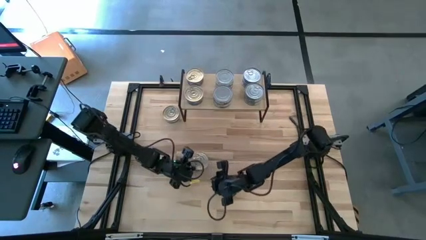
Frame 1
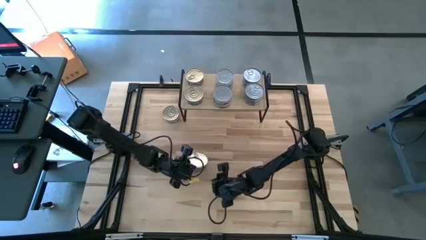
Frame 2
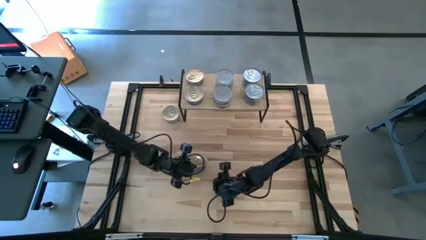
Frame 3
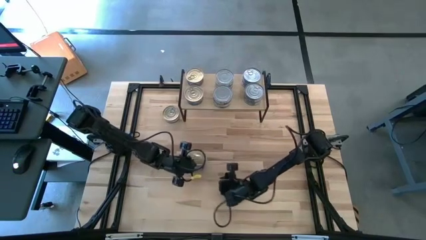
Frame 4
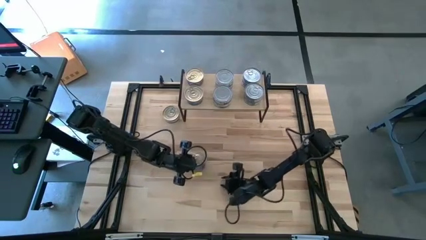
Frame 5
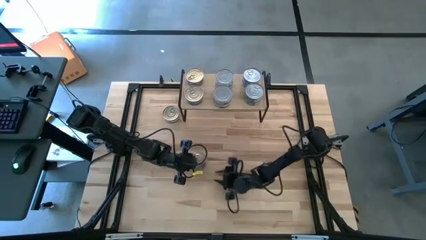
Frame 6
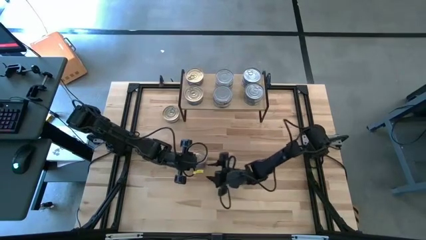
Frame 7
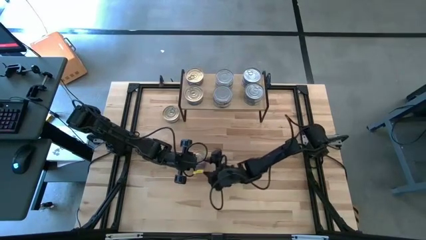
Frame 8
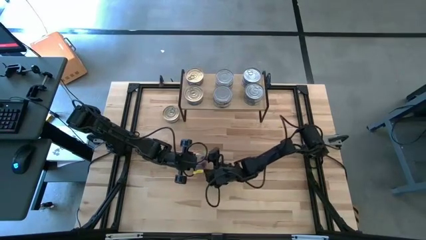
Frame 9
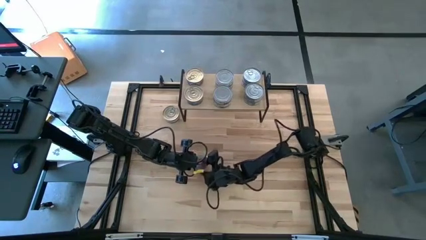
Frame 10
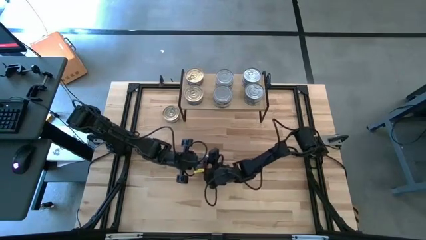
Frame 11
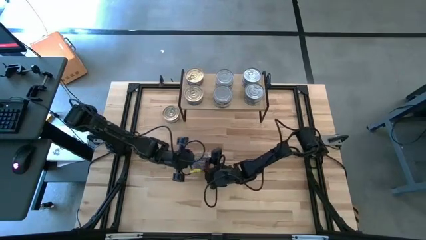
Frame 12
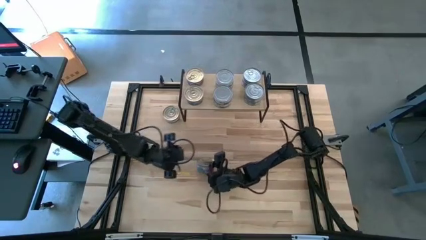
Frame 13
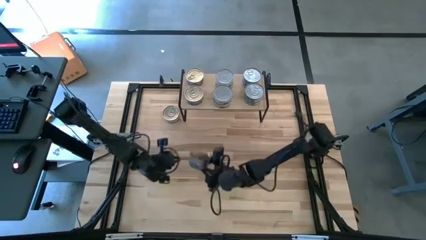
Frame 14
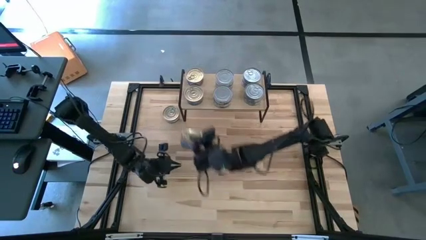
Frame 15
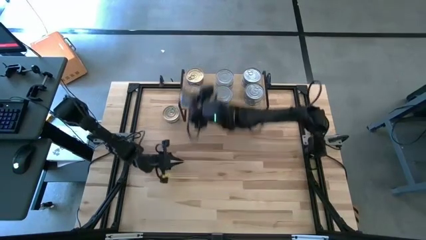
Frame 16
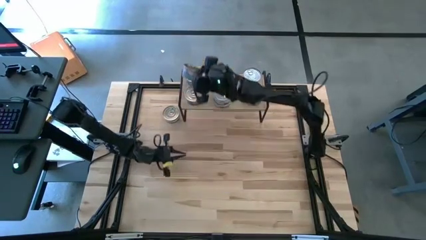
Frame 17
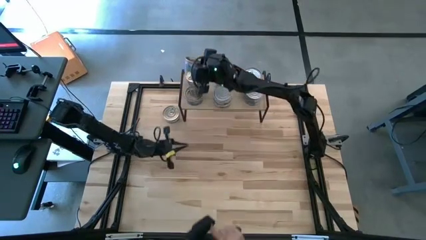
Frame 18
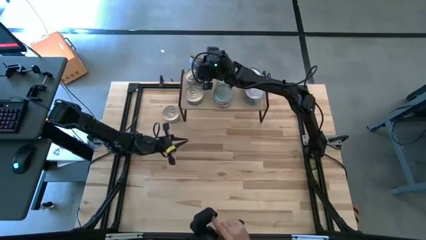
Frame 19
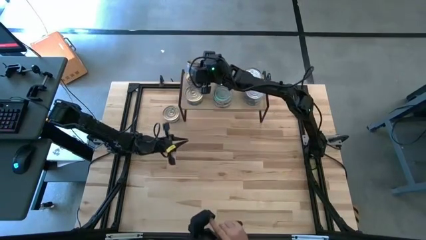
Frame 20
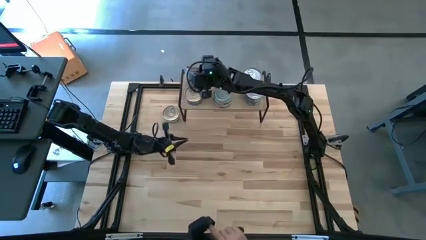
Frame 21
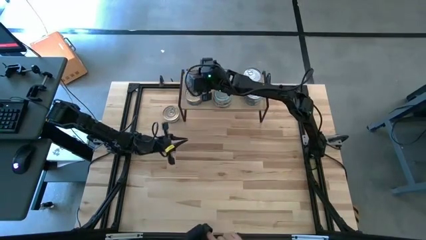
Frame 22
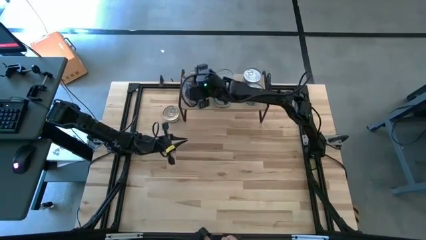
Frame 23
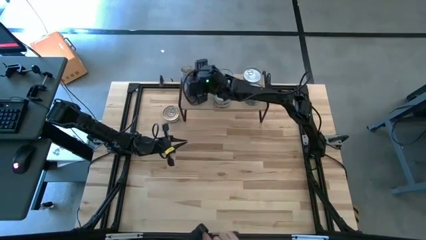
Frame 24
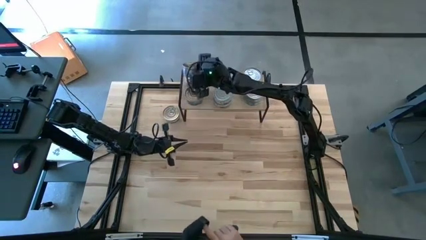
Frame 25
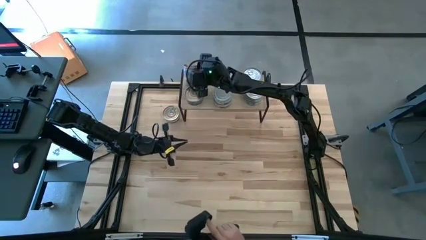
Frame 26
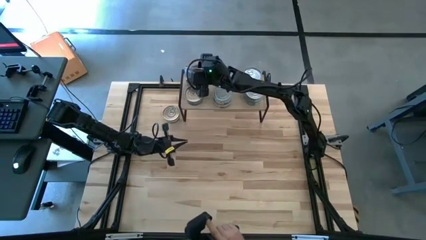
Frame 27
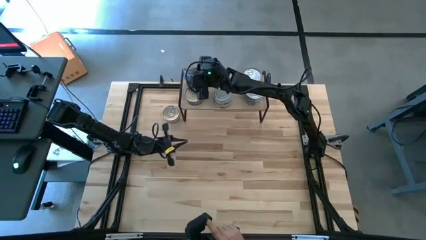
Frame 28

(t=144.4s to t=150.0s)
Task: Stack canned seafood by type on shelf
Stack the blue tuna can on top of the other blue tuna can

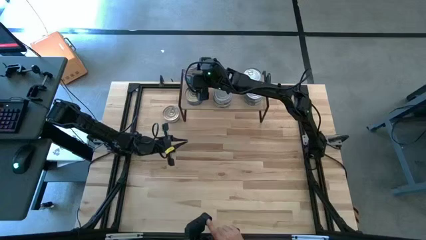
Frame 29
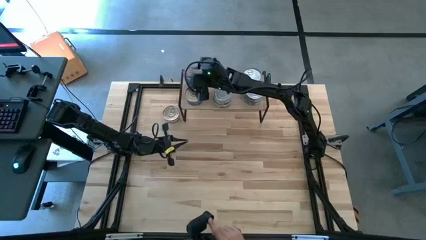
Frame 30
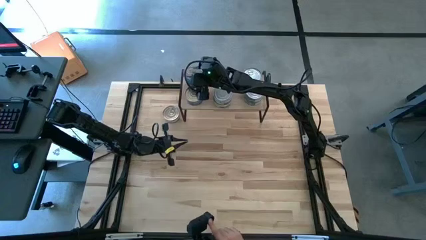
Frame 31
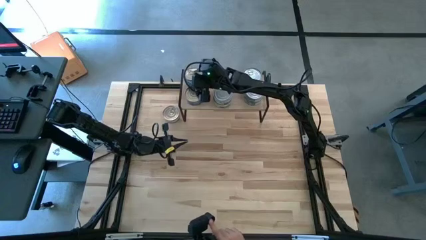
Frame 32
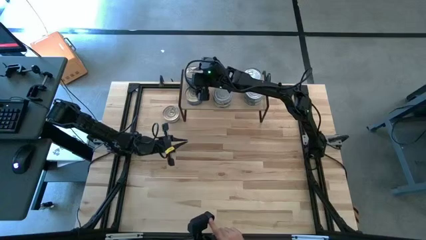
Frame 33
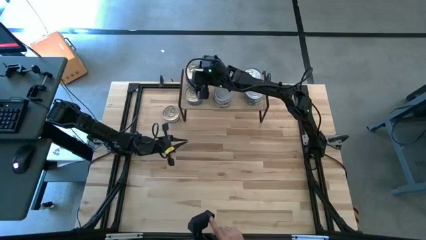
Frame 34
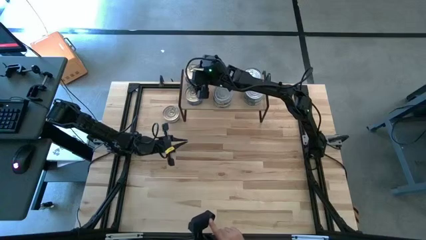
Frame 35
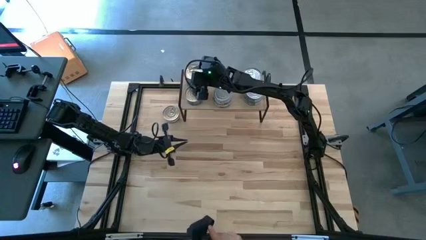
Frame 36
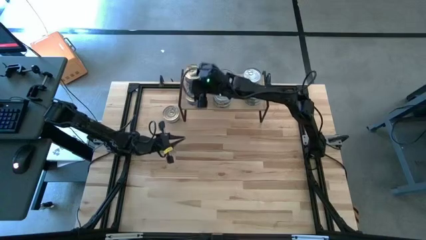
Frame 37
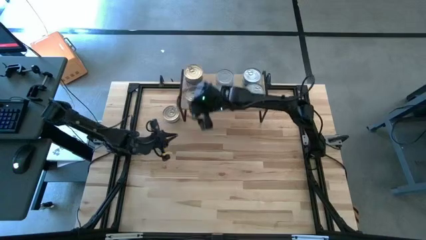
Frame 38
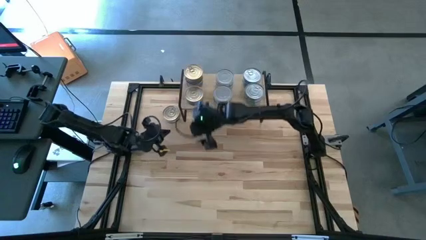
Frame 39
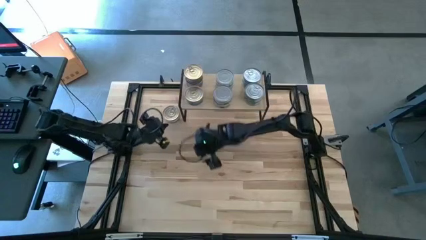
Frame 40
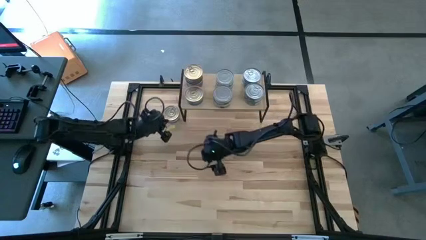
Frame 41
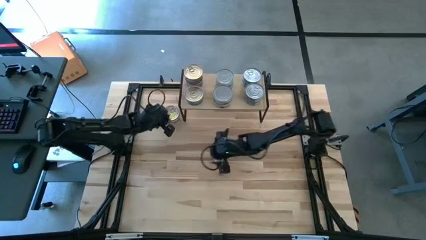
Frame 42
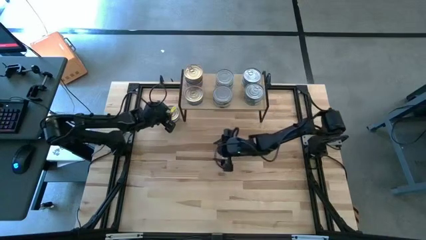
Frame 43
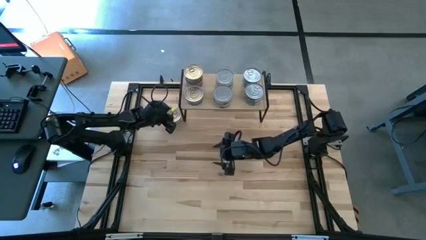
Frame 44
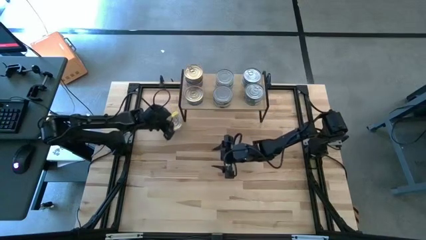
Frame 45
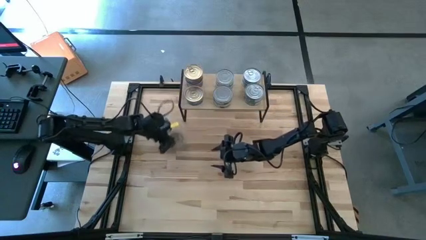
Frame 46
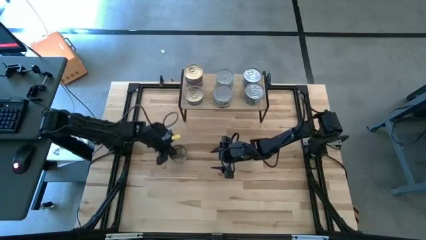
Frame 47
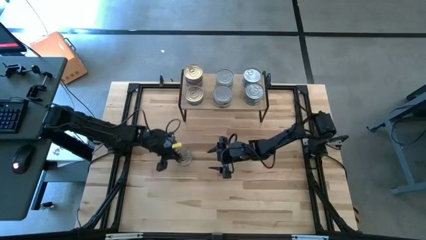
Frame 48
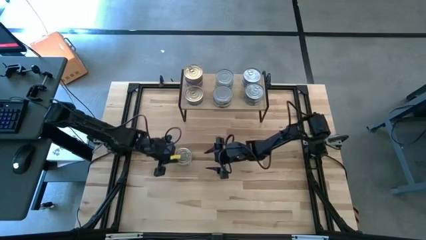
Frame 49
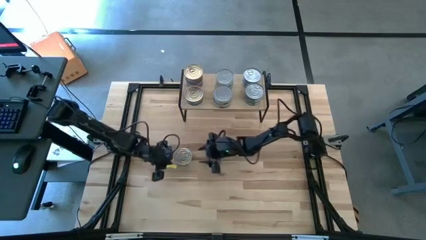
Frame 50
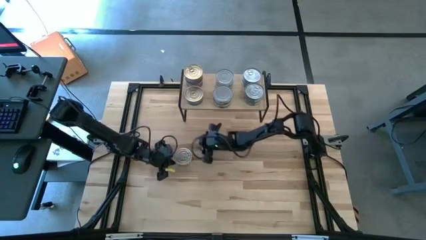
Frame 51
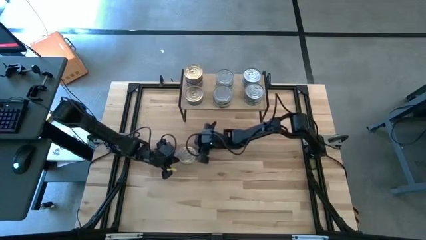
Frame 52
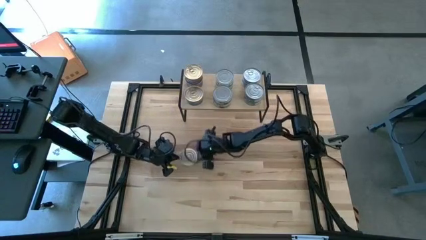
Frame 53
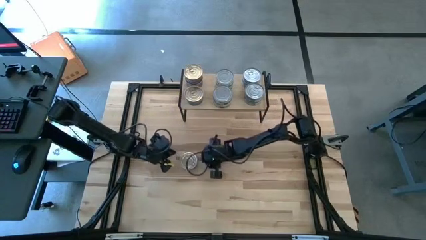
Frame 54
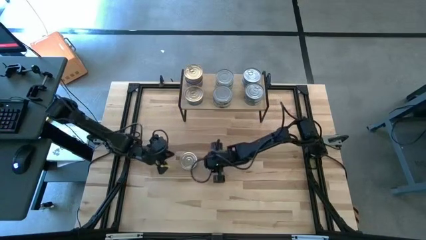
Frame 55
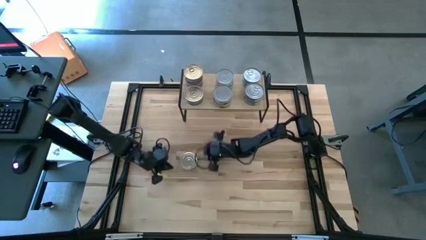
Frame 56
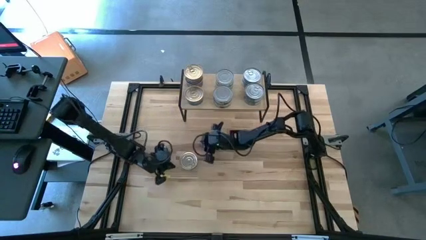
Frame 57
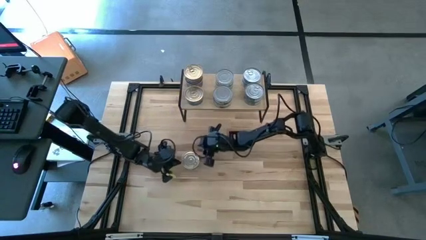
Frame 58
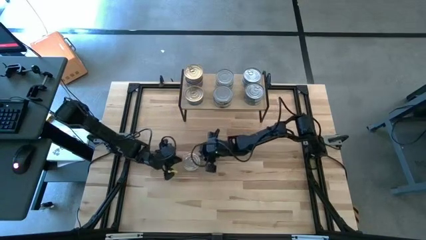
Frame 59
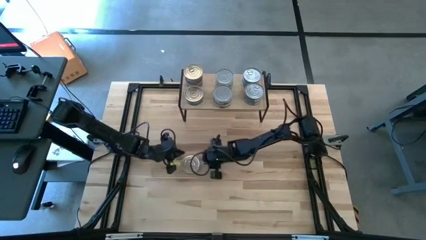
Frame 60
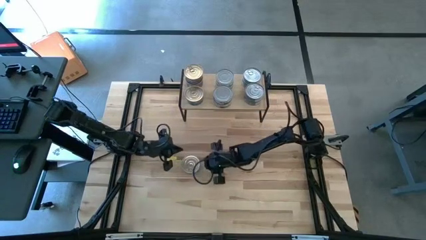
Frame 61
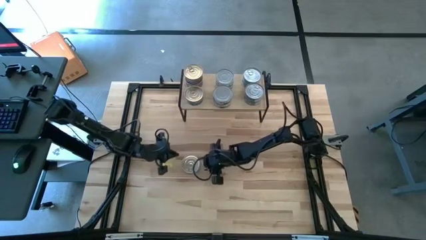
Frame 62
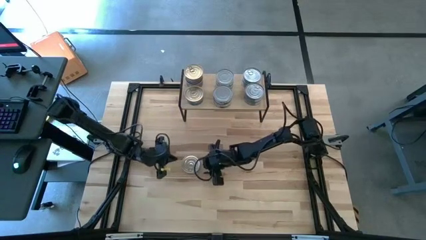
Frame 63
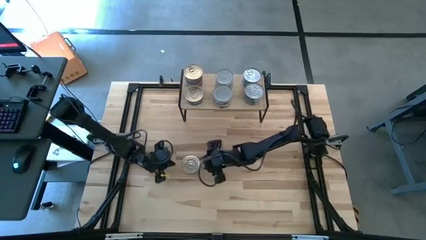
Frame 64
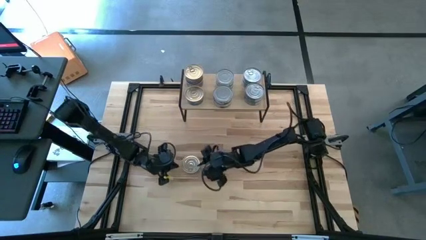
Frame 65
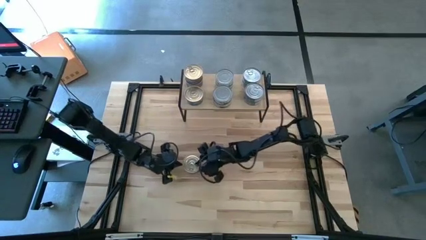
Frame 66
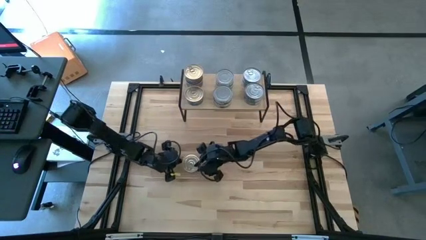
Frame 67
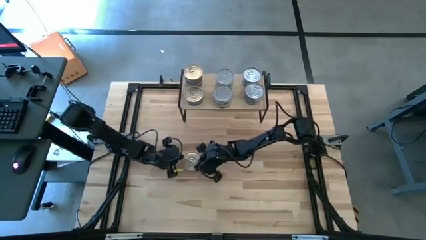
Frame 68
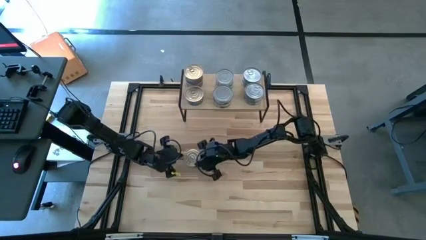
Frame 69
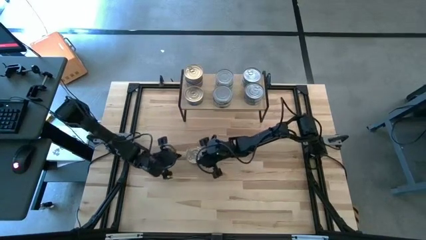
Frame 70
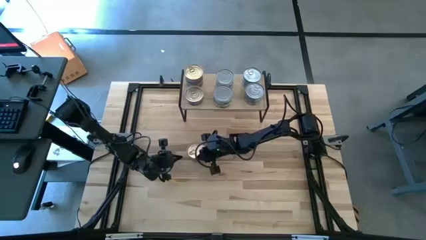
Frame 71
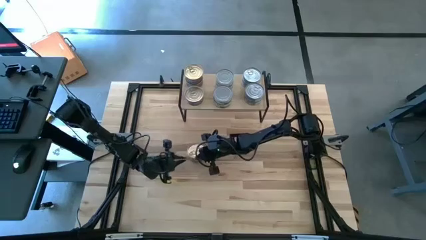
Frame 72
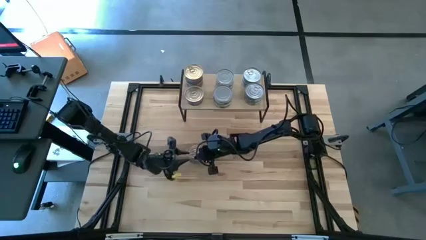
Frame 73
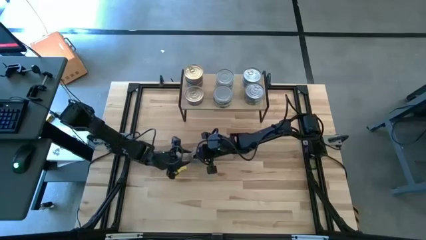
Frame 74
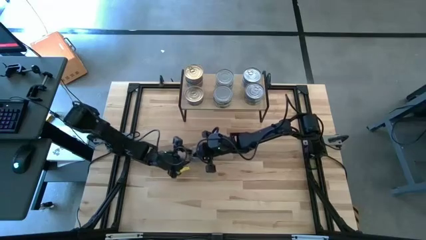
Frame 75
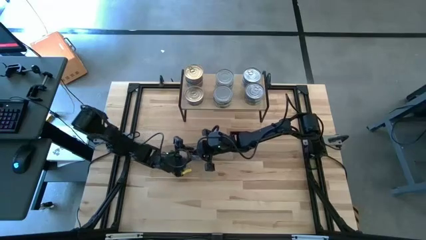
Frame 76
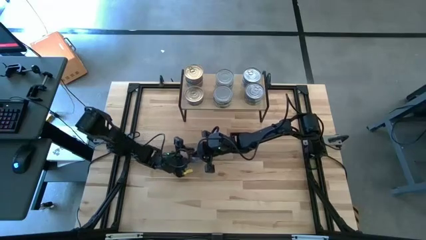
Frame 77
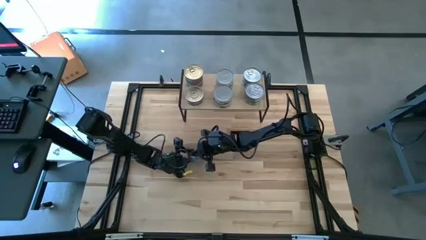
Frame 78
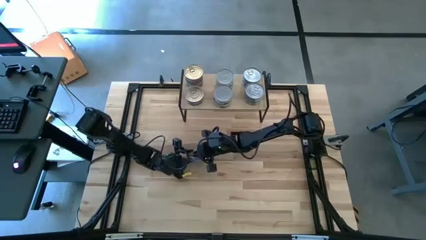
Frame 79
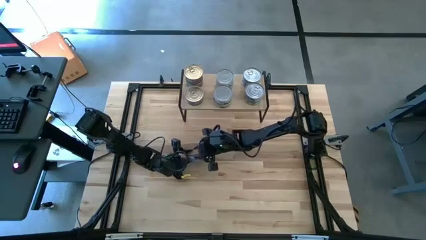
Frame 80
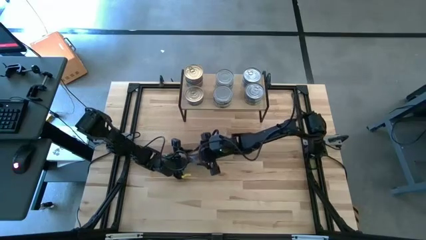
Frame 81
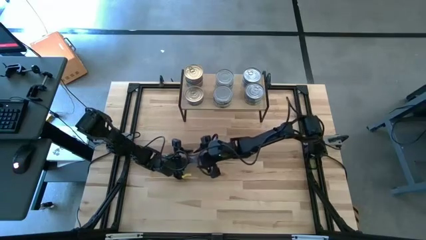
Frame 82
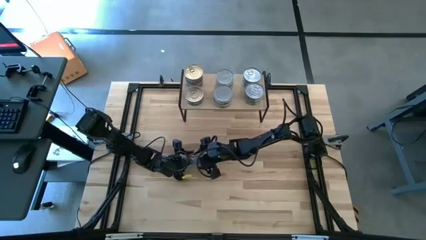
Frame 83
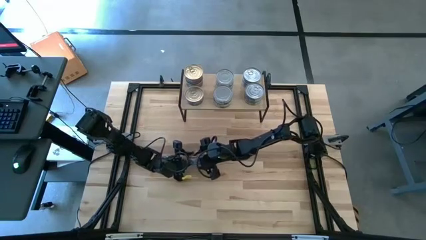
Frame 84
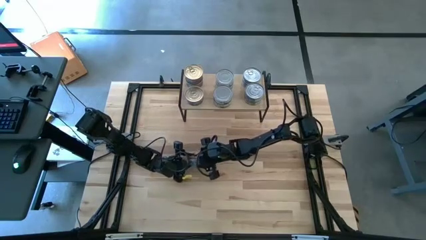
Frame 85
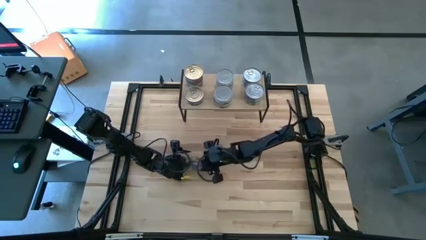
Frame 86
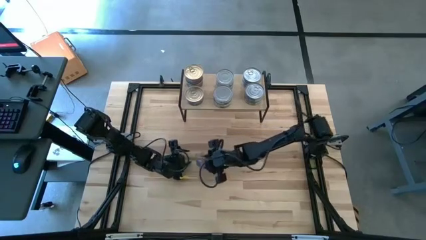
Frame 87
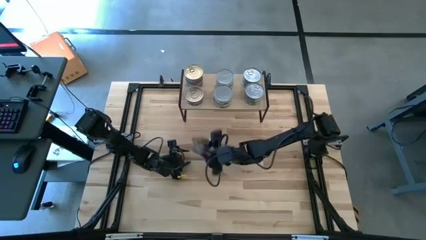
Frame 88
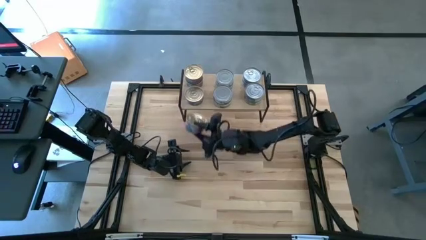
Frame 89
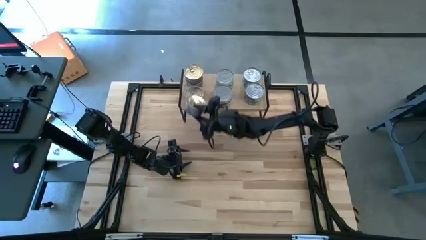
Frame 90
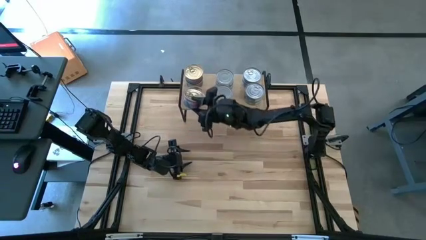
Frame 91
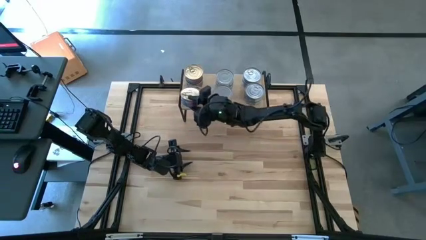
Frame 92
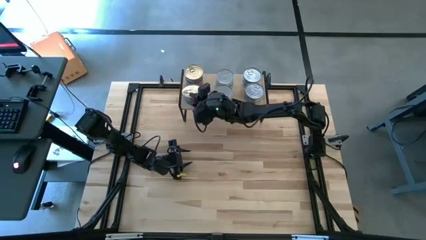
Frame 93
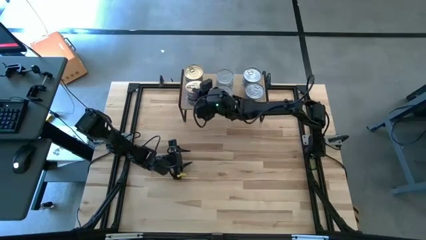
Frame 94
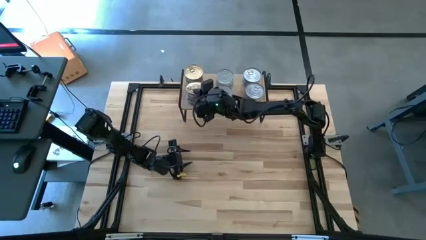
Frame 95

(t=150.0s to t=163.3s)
Stack the blue tuna can on top of the other blue tuna can
